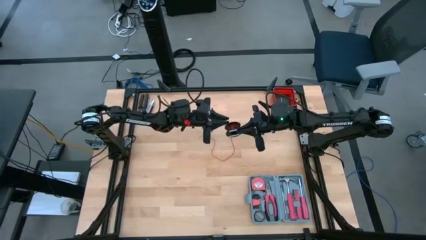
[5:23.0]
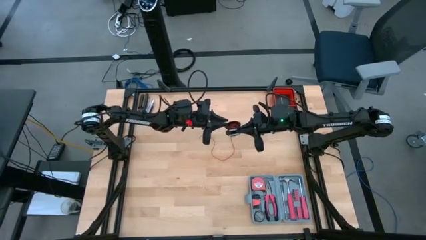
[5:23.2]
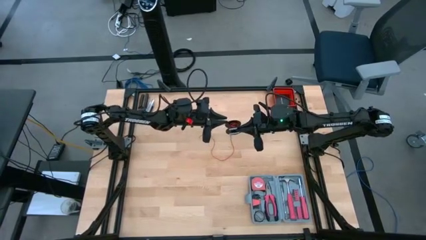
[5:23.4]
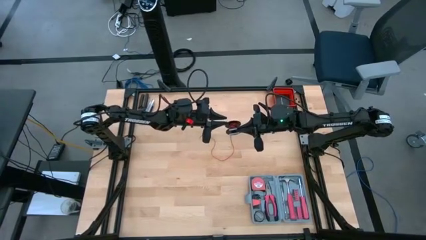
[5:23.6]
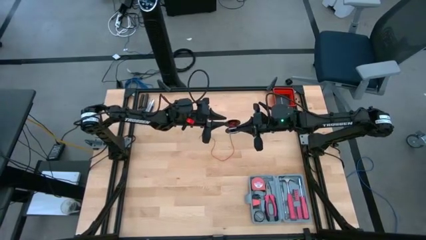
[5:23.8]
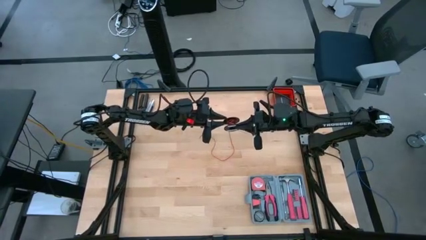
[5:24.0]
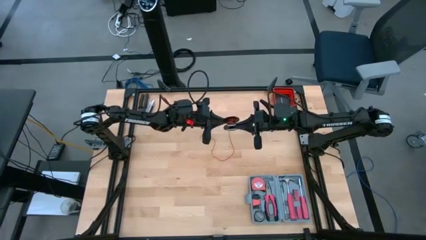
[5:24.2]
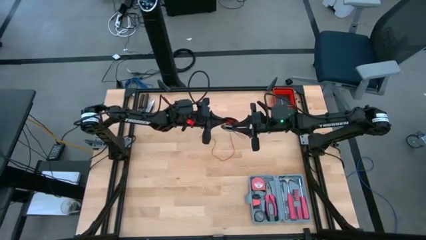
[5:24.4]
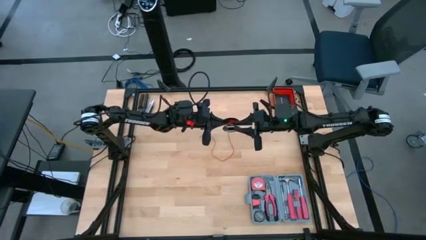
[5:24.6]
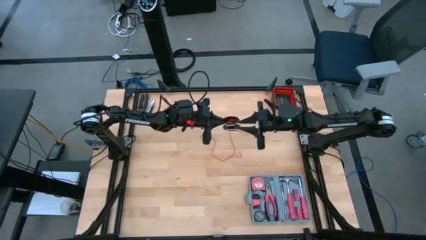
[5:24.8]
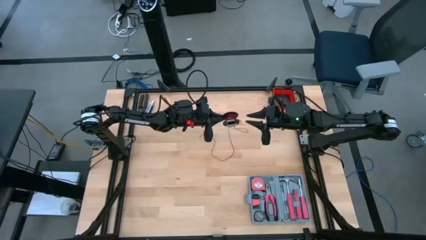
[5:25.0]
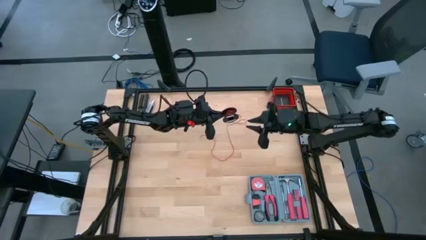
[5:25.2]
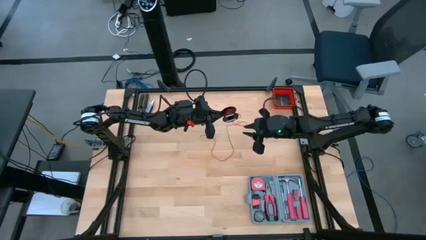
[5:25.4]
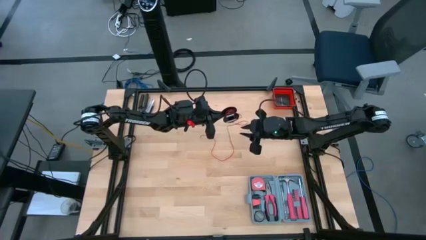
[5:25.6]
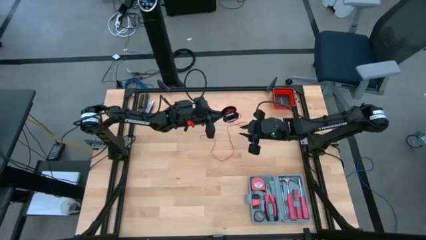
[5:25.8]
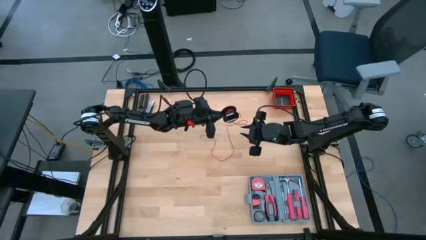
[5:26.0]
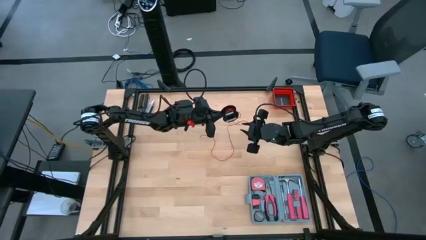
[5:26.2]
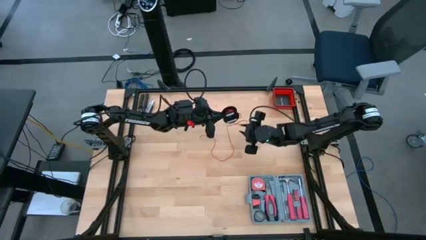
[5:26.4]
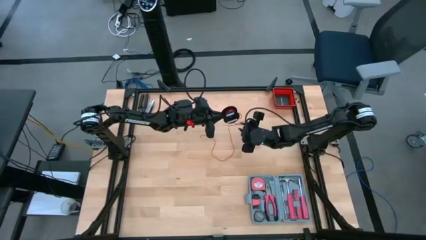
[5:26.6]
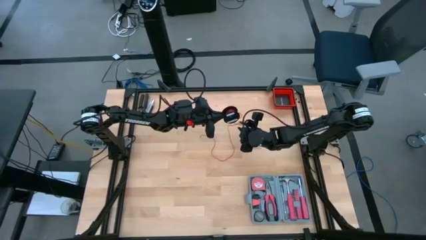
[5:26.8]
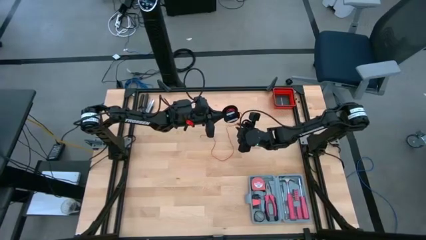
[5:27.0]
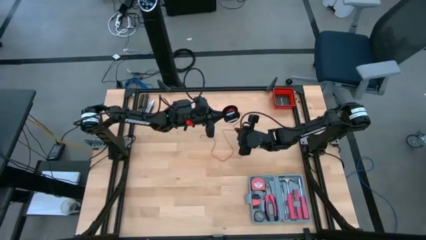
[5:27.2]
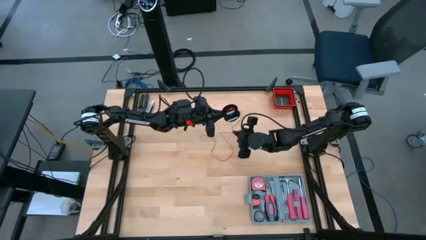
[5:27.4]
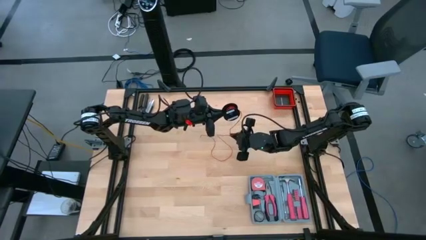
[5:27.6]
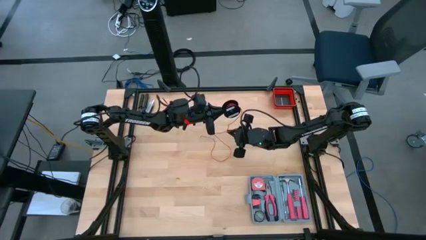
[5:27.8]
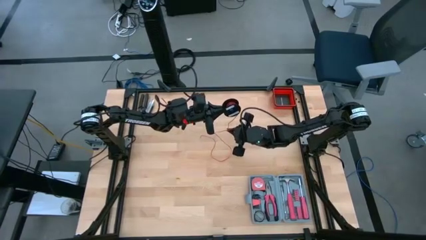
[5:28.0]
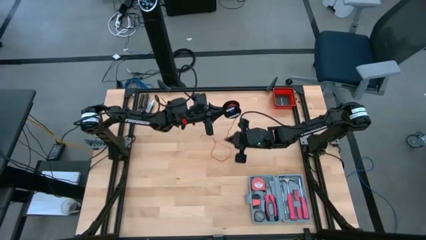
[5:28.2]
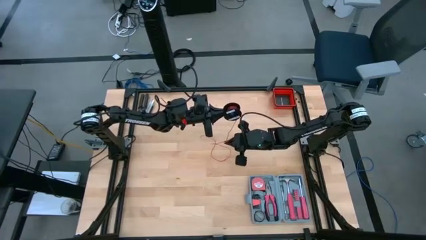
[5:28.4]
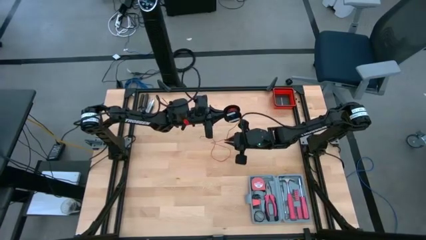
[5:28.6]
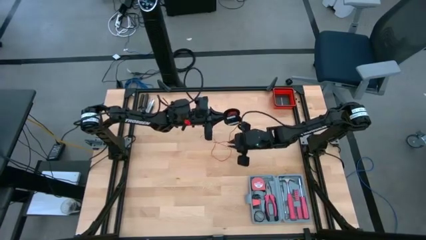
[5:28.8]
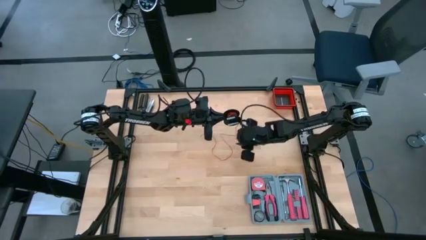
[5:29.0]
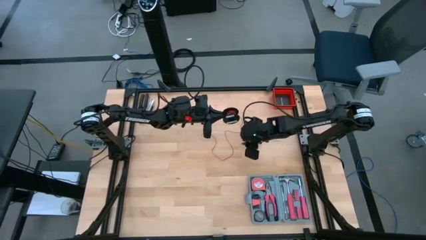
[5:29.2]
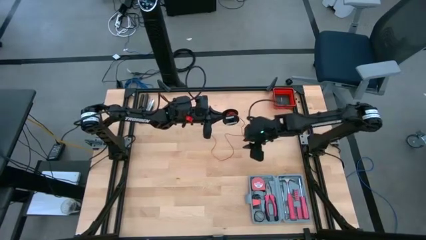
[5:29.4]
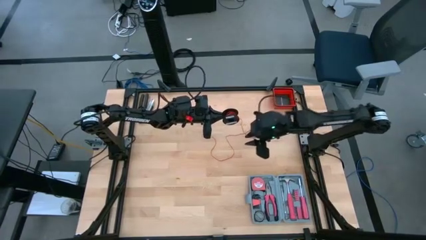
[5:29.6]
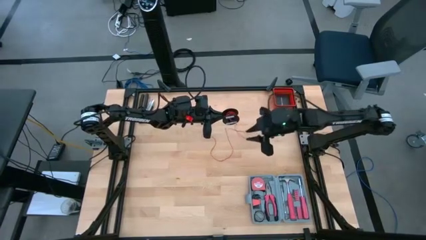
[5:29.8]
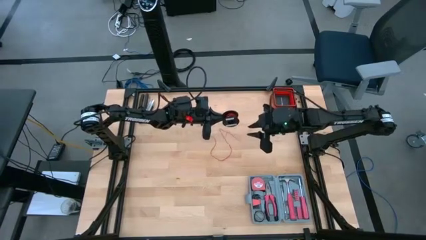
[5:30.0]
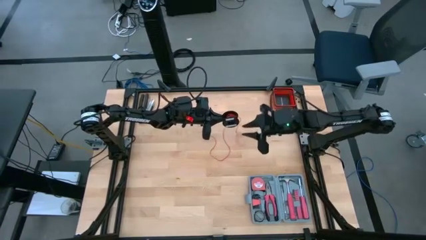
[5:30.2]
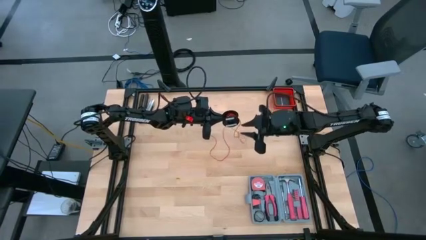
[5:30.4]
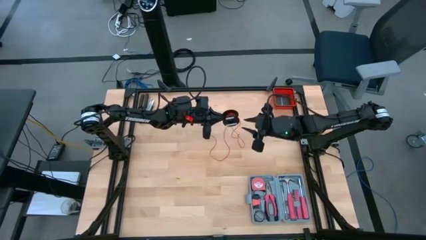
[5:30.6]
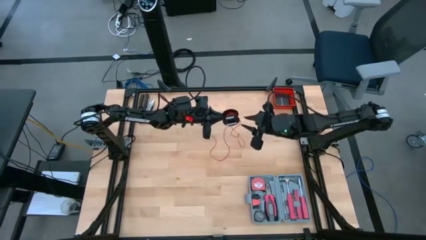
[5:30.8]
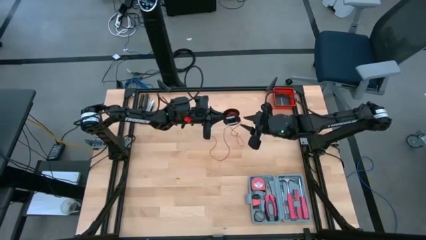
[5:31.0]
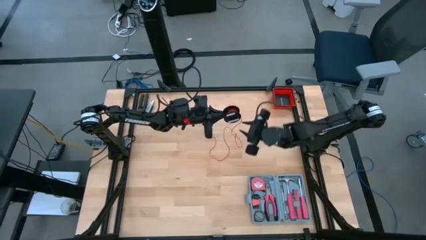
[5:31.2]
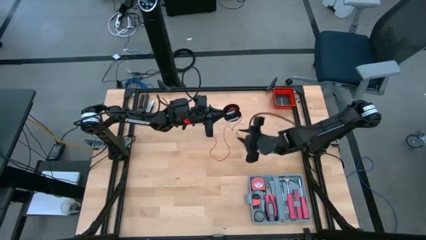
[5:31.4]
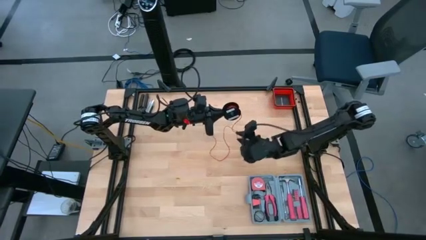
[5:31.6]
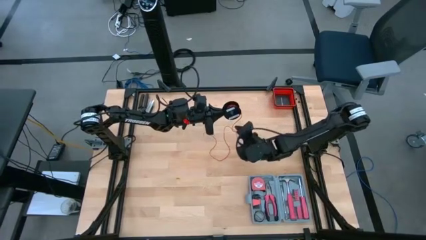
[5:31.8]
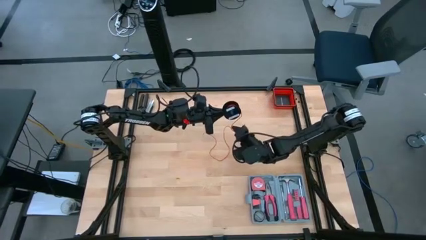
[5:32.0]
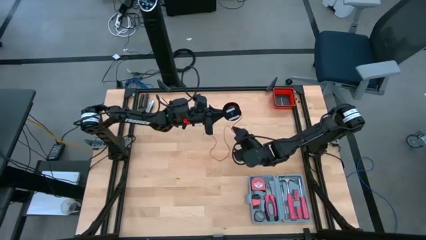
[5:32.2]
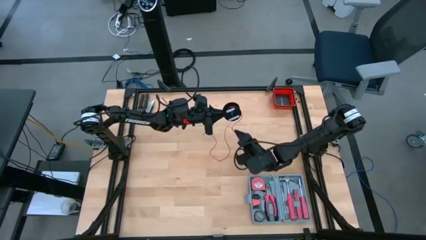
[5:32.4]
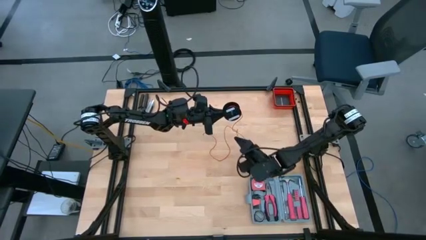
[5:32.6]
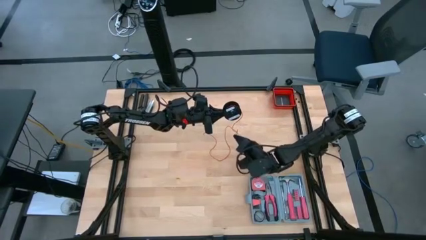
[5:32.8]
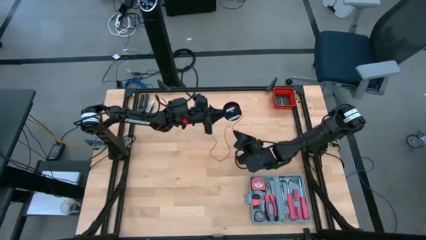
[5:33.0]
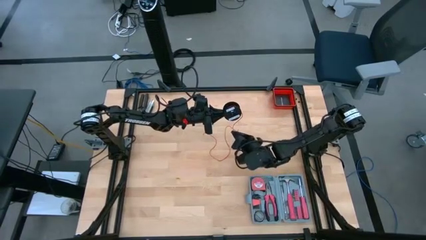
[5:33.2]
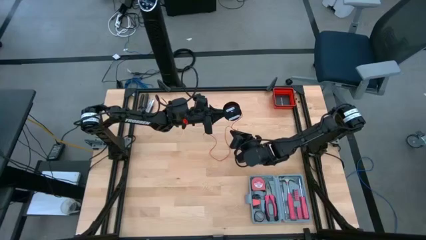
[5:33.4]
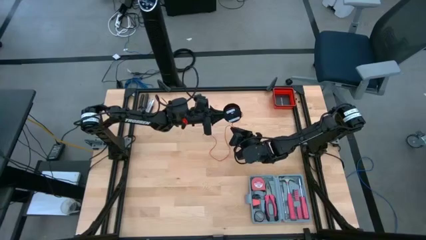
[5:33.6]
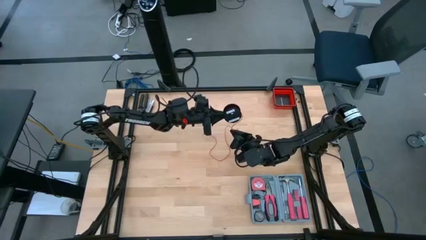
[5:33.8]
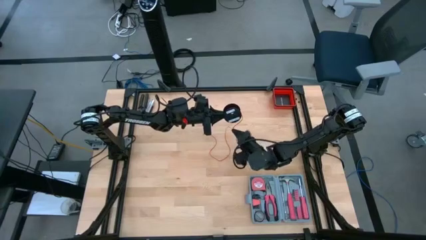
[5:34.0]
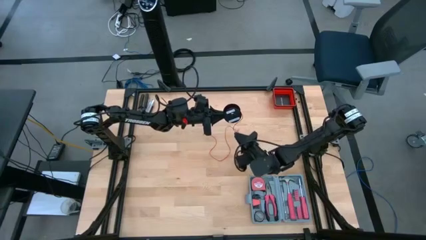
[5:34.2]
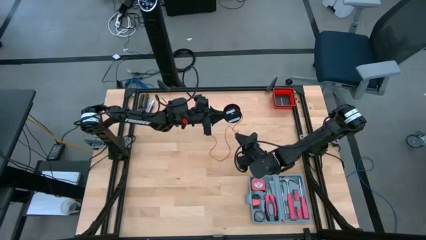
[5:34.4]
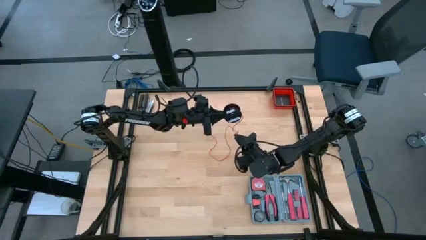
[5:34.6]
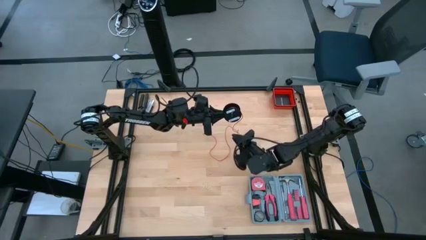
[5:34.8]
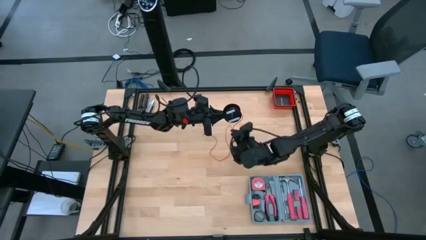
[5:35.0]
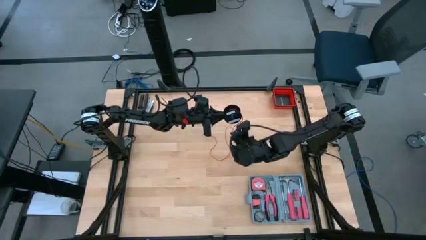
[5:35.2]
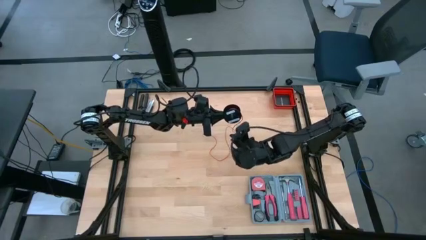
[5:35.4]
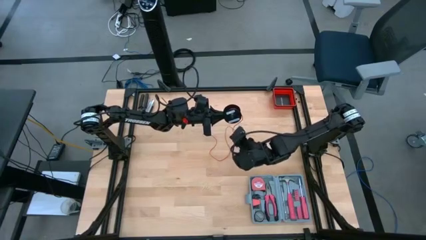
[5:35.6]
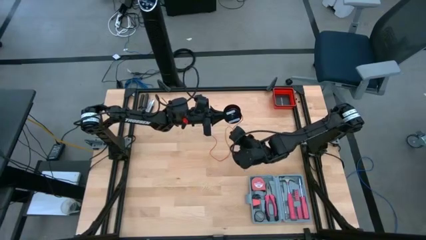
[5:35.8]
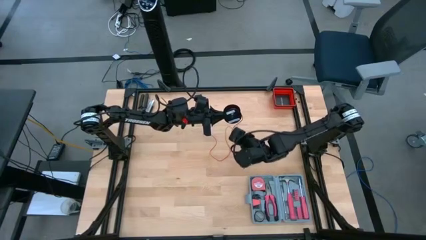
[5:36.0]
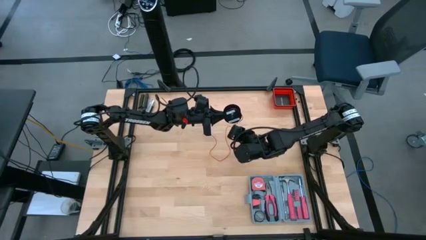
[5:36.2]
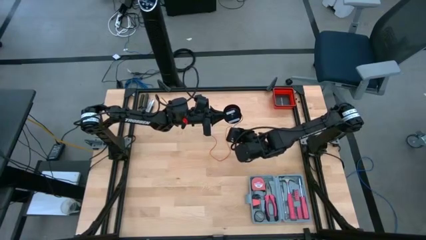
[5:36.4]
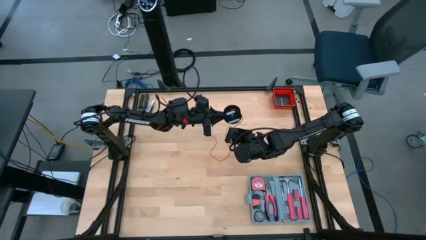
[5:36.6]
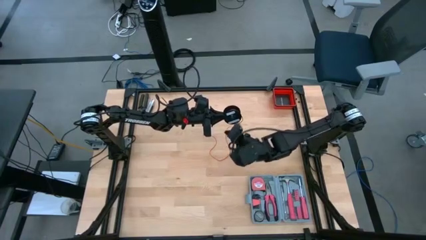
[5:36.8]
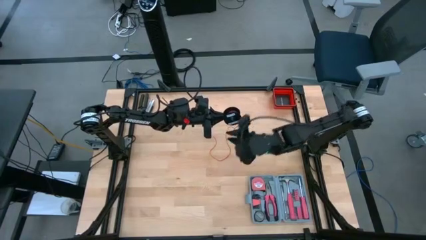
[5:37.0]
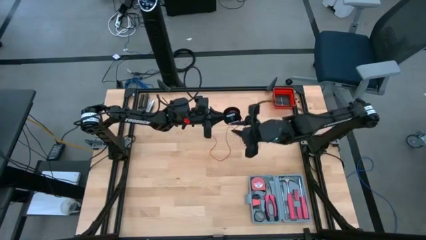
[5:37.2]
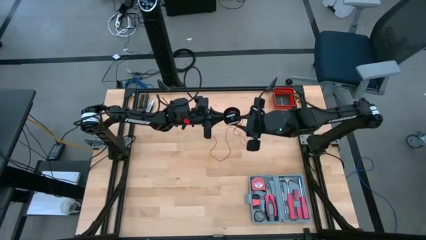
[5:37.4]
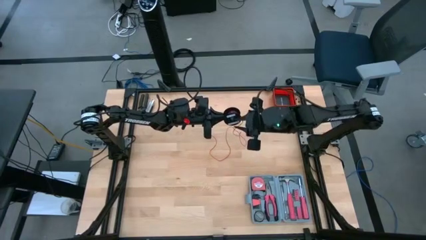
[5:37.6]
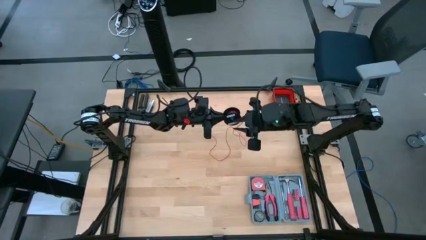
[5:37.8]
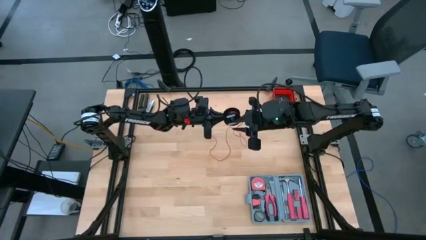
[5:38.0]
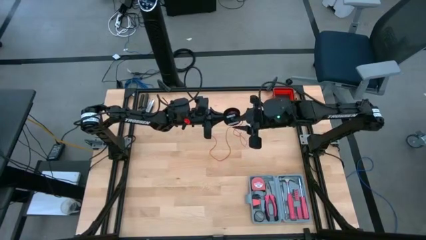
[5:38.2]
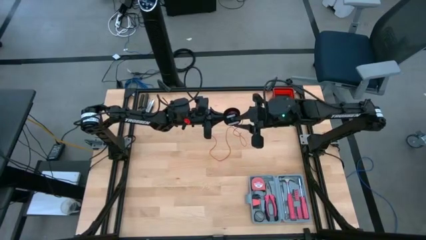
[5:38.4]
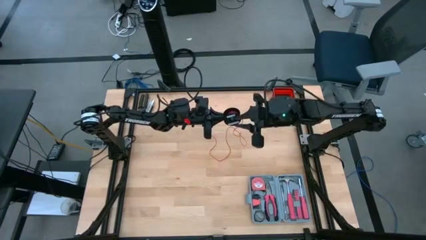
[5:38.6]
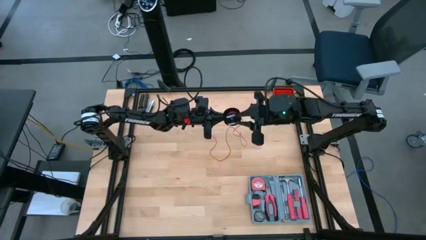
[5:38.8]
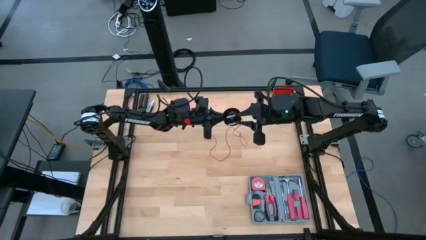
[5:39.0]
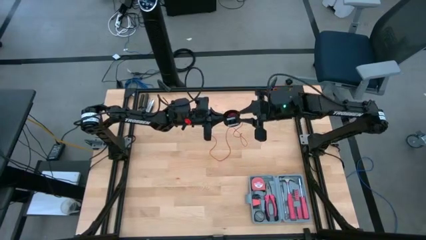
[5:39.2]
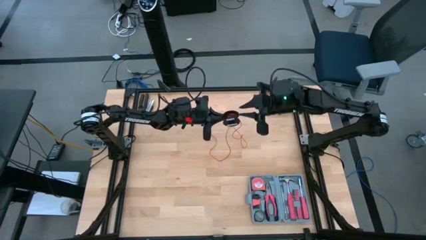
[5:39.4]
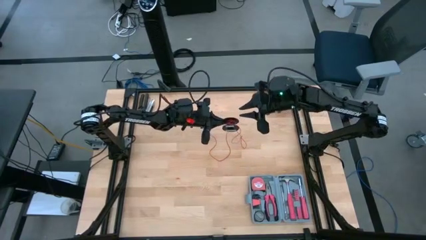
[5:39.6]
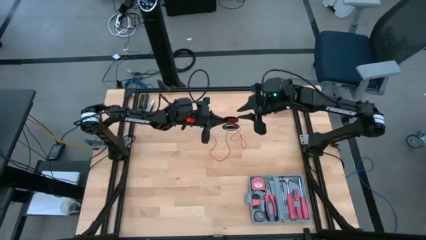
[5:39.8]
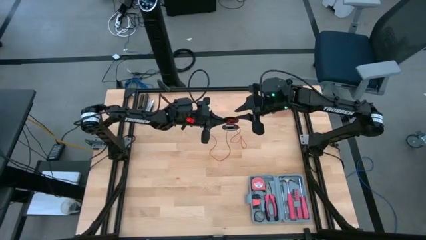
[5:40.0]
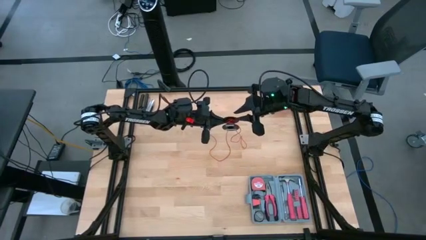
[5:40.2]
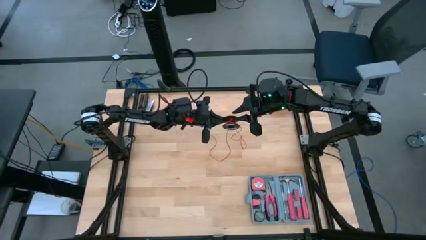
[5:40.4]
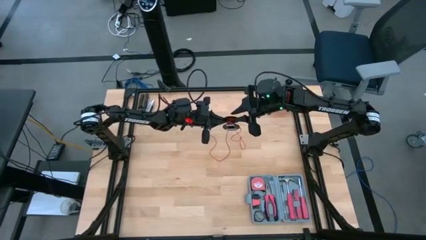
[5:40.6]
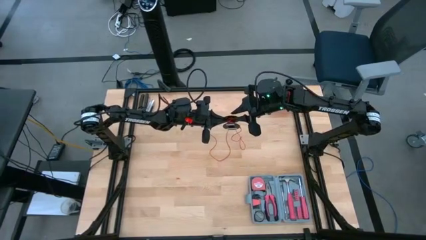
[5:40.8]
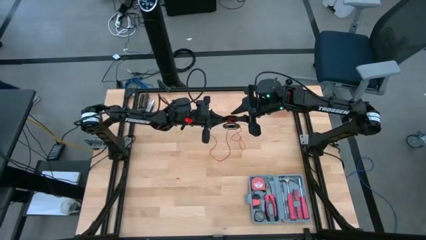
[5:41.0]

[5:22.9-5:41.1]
Task: Coil cords
Coil the wire
